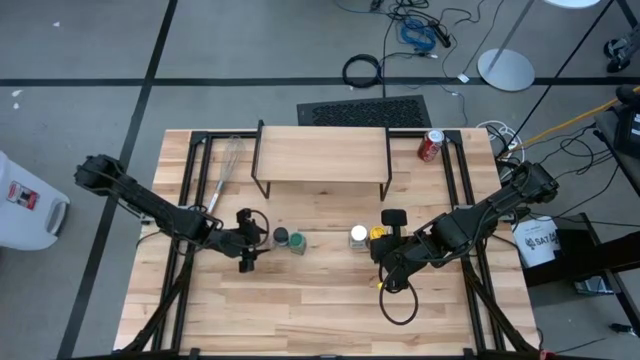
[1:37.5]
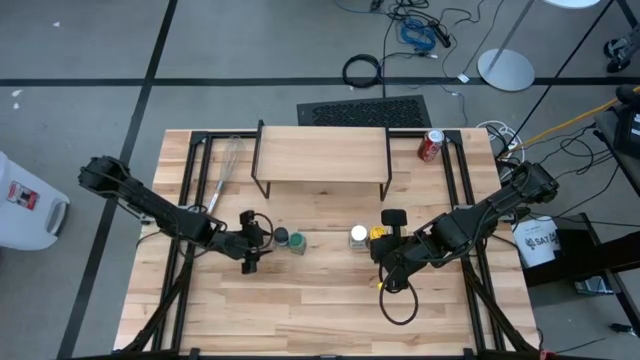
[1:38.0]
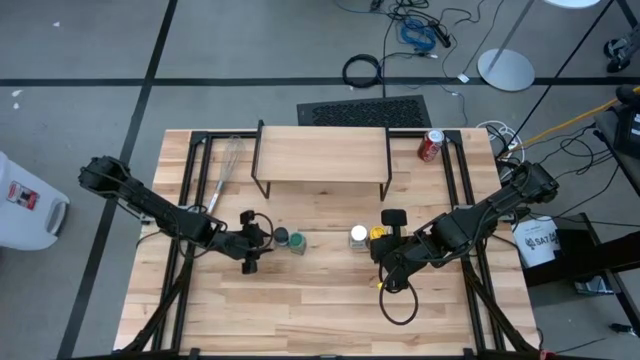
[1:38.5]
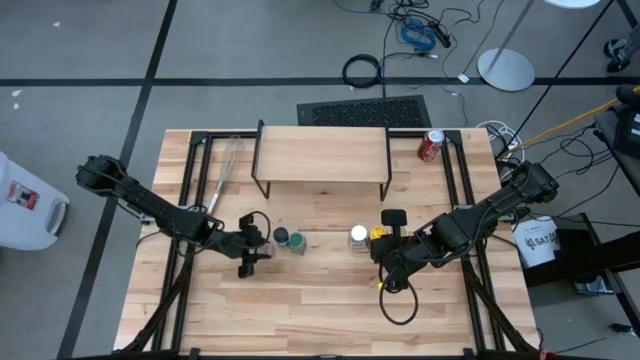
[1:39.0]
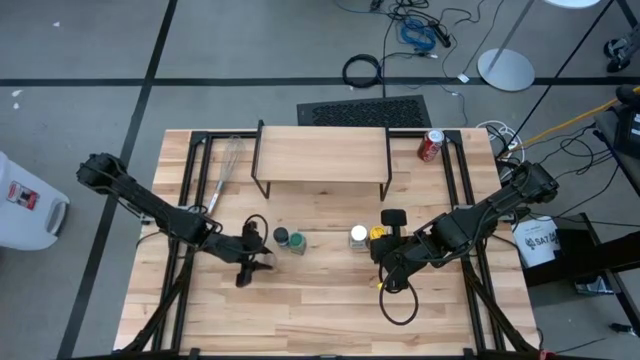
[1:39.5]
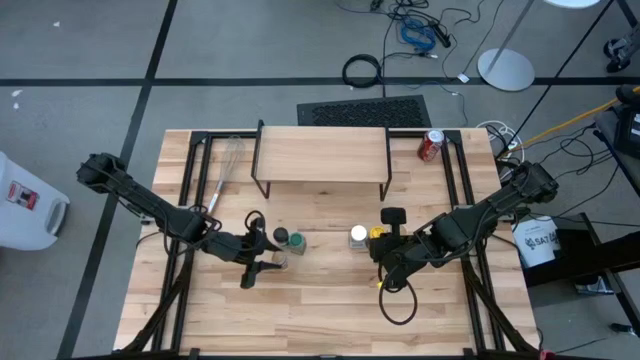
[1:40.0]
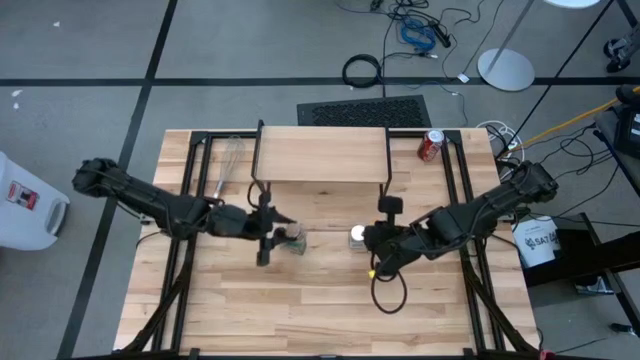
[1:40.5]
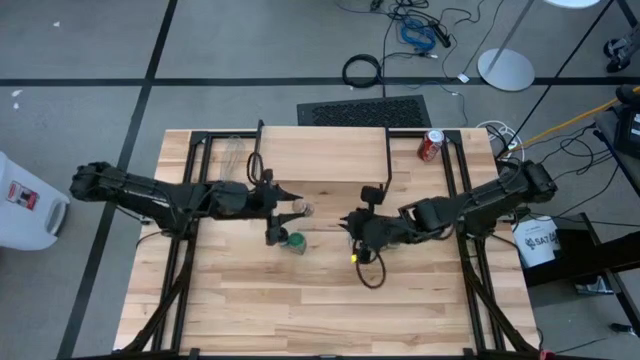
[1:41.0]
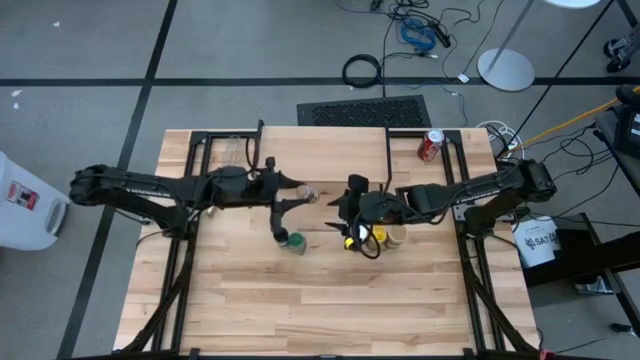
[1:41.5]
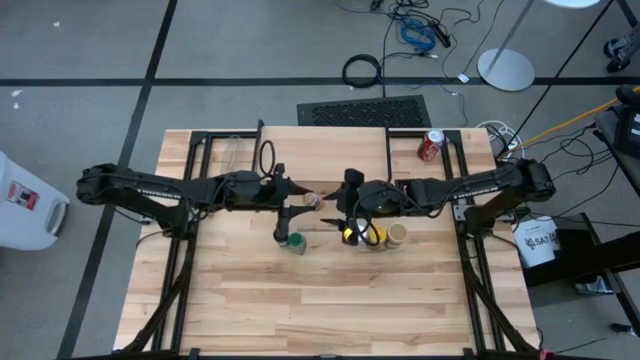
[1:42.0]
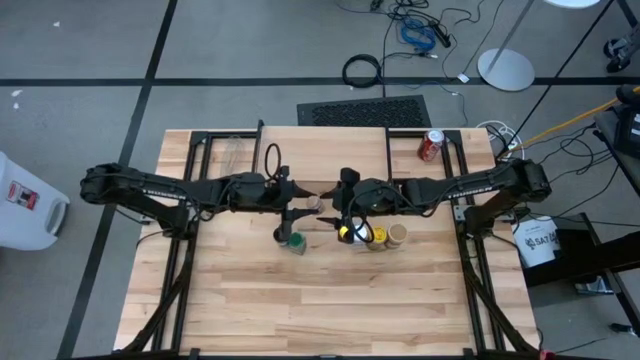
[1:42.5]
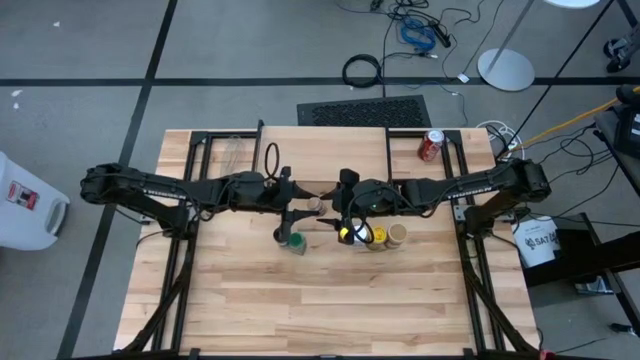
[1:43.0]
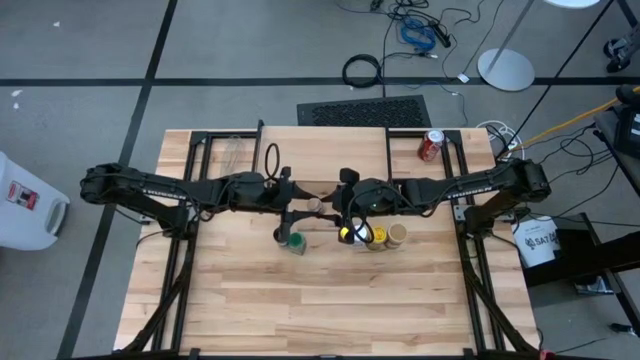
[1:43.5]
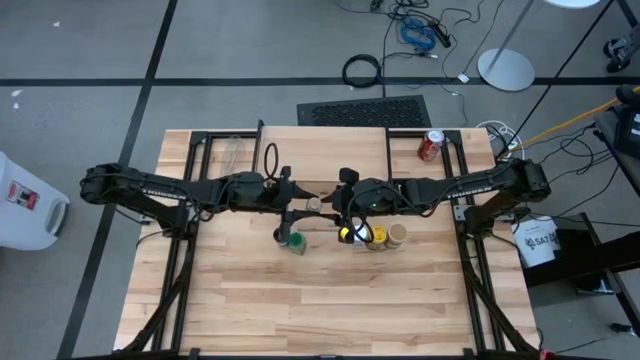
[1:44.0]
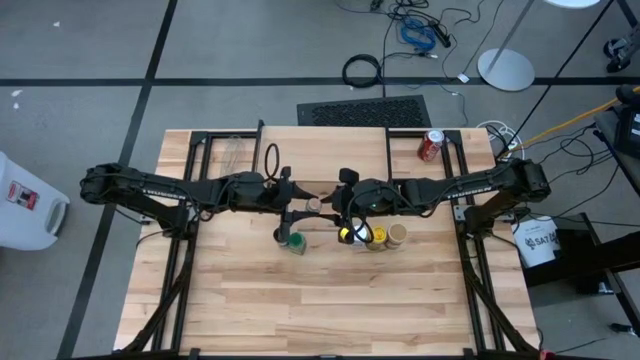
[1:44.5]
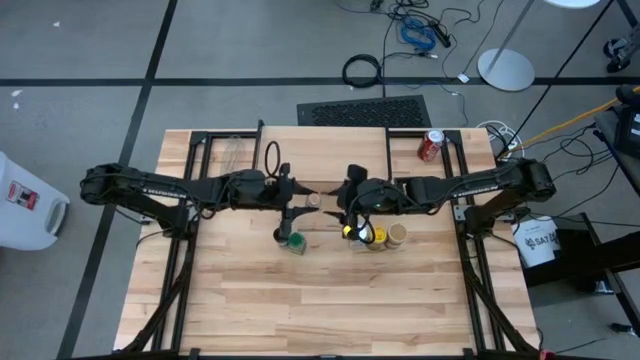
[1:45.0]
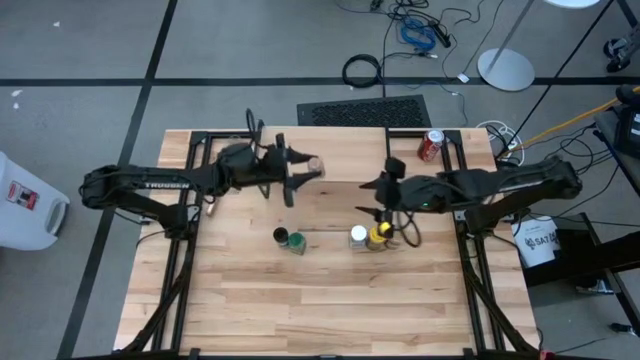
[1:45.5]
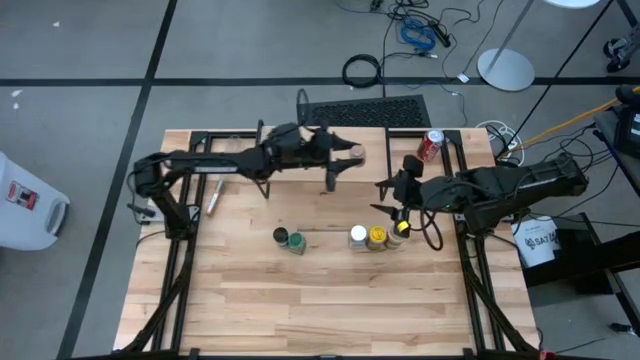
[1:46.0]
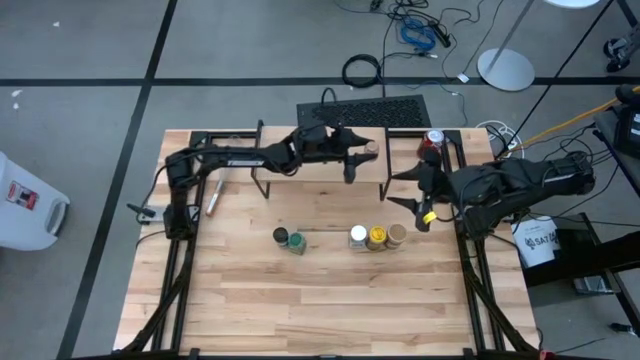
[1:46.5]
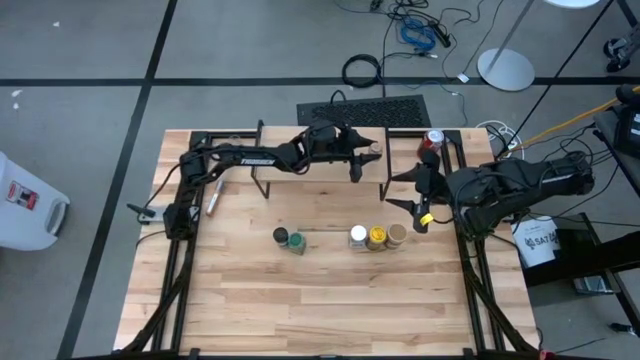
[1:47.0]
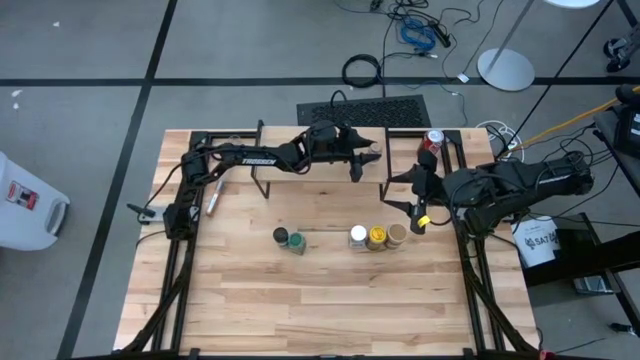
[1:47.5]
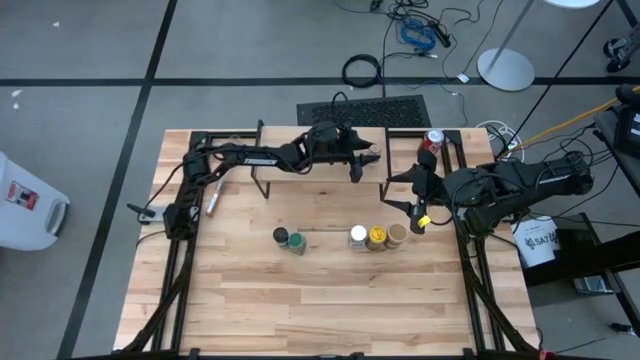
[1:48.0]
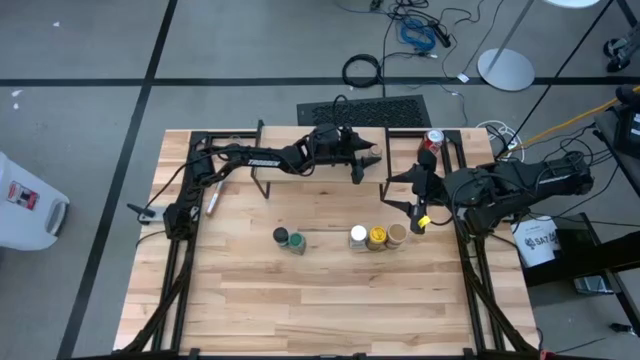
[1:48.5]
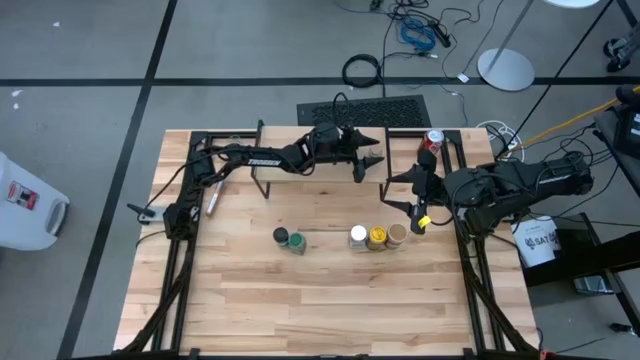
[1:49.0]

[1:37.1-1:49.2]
Task: Shelf spices
Put the brown seasoning bottle on the shelf

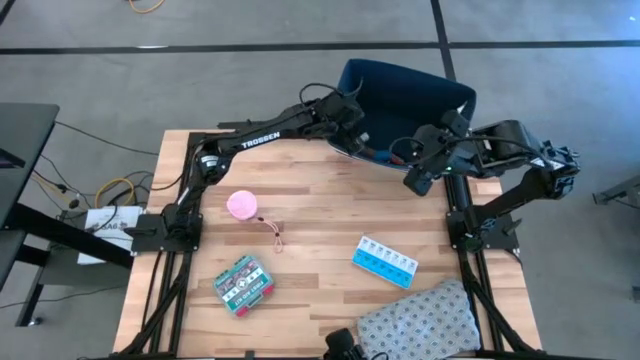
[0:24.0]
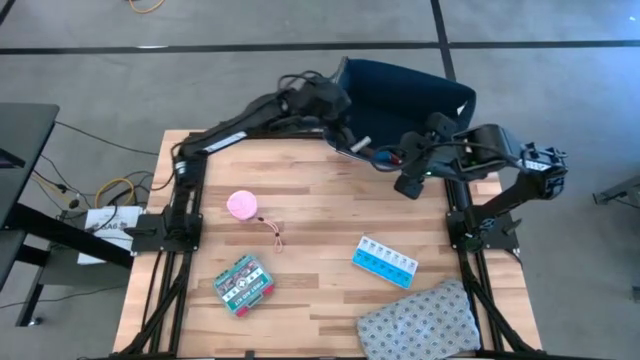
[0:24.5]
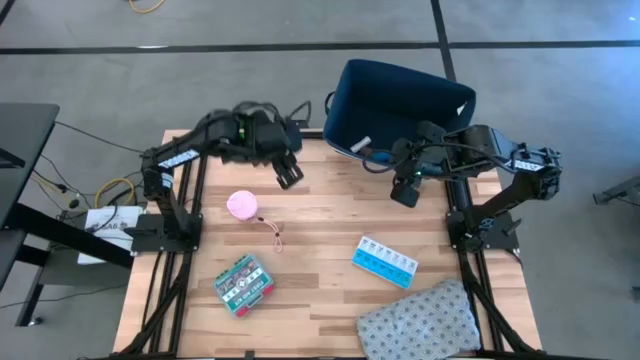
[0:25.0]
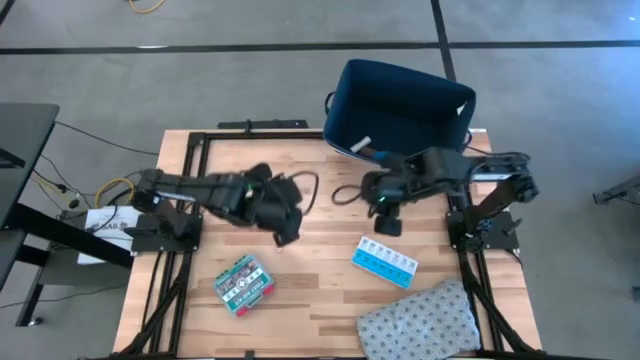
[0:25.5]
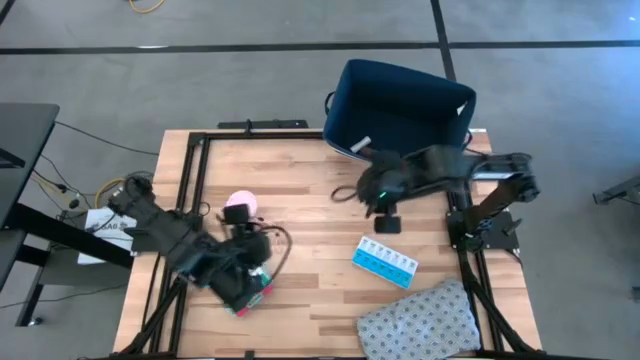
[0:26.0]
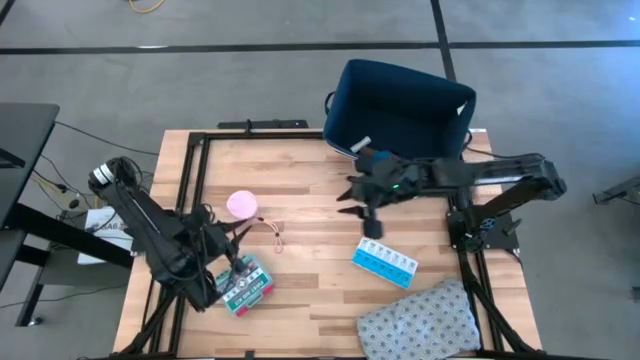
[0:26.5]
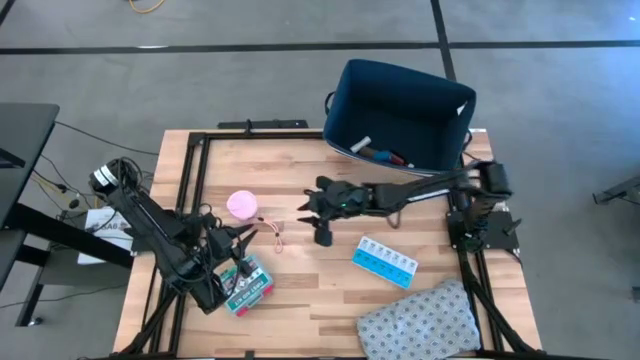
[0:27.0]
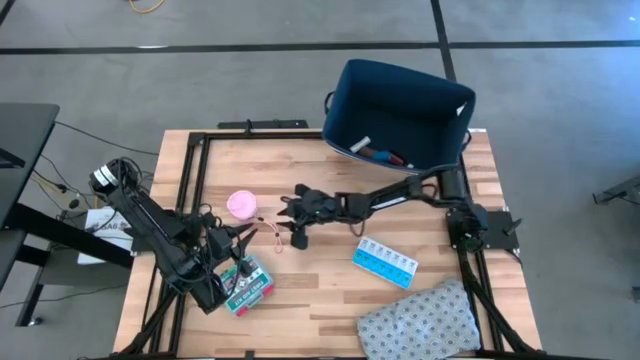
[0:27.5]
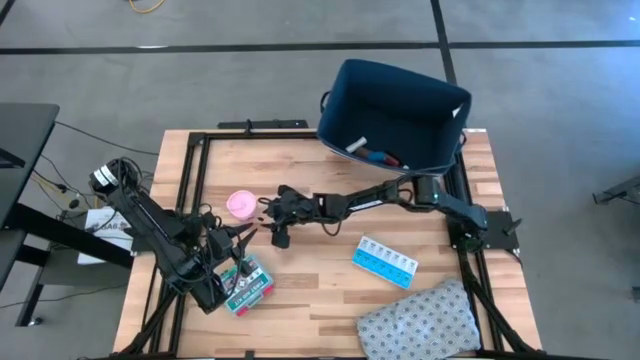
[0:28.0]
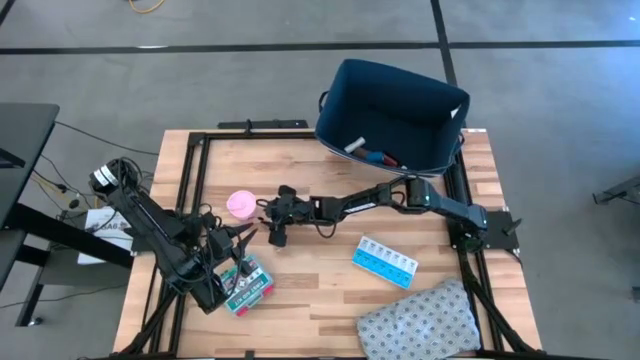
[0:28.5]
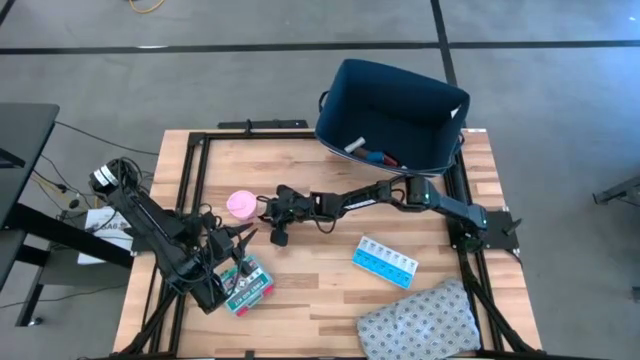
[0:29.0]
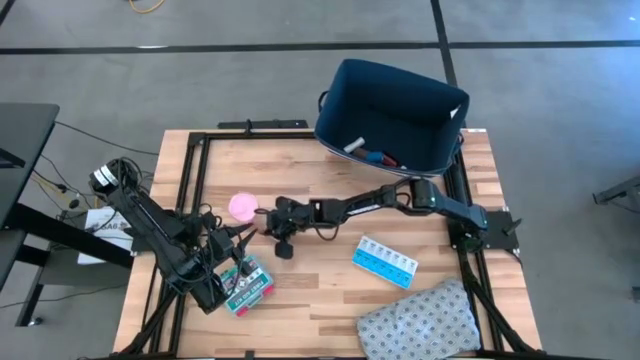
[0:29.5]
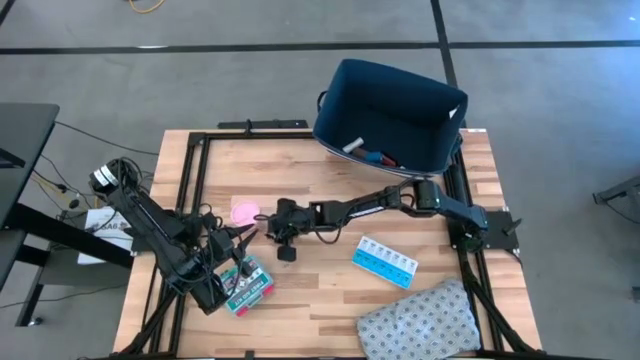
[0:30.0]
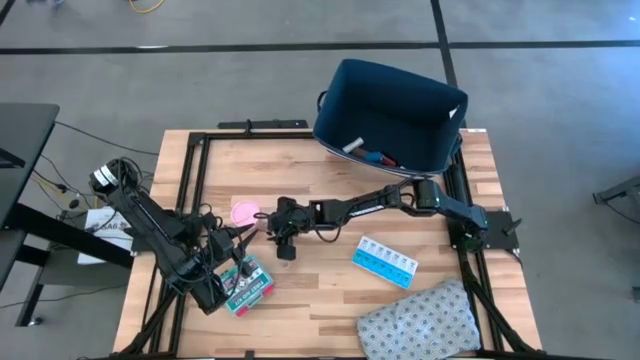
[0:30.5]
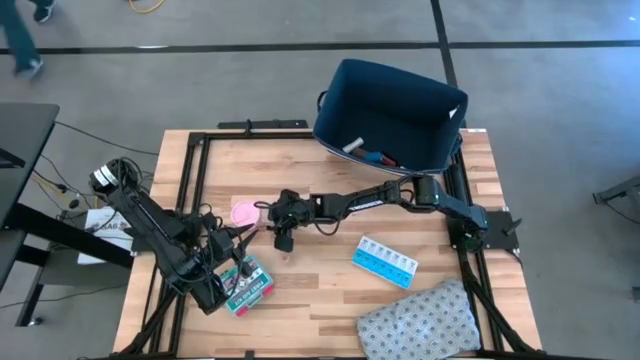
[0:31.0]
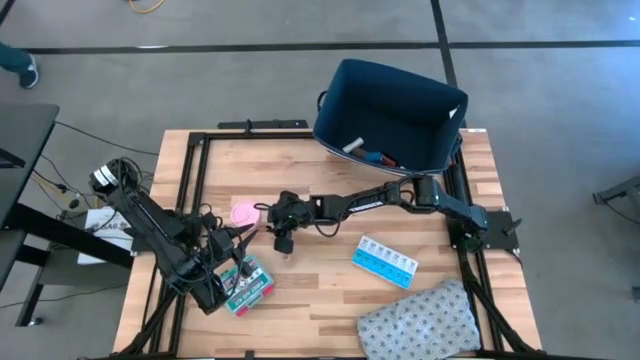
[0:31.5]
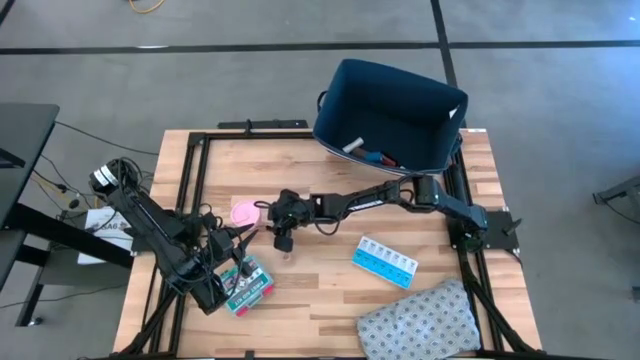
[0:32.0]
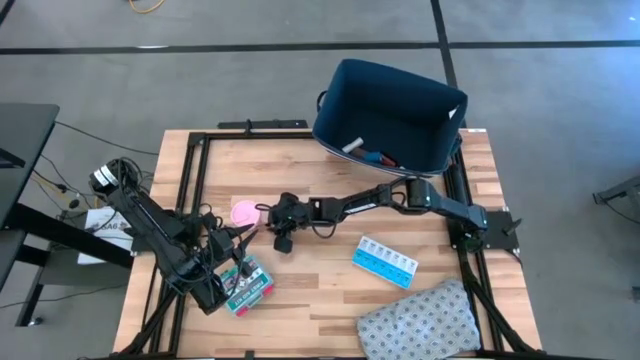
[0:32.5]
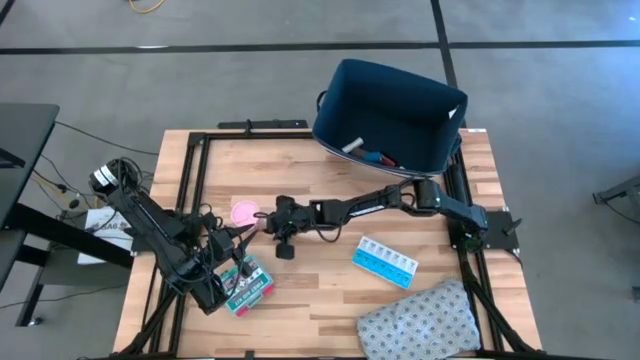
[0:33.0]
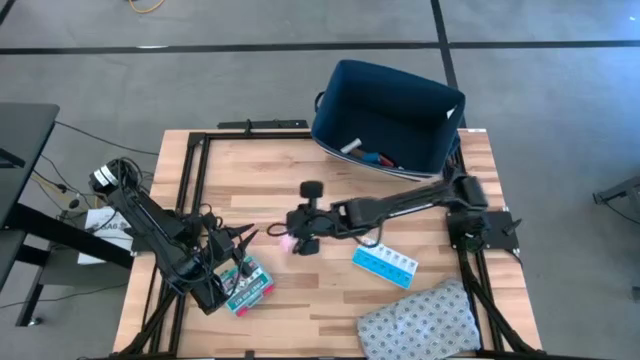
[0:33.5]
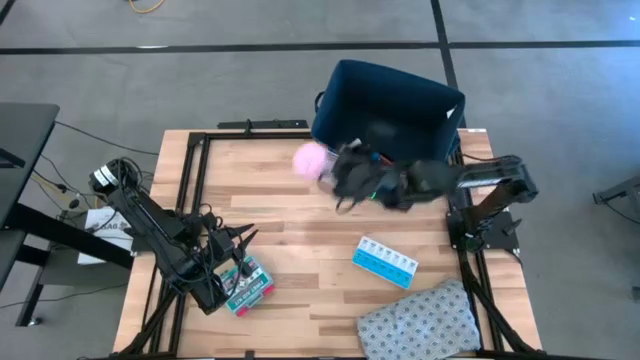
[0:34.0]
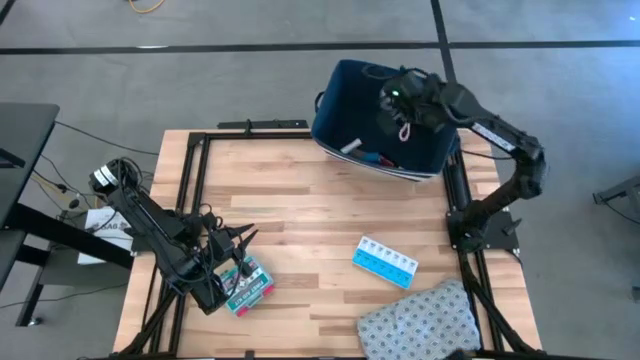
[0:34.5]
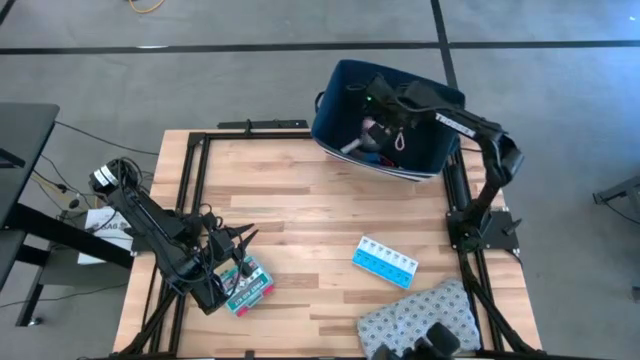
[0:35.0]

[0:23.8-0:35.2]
Task: Pick & place medical supplies in basket/bin
Put the pink tumbler into the blue bin
